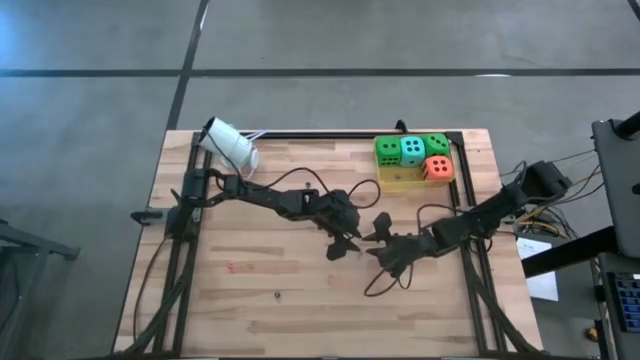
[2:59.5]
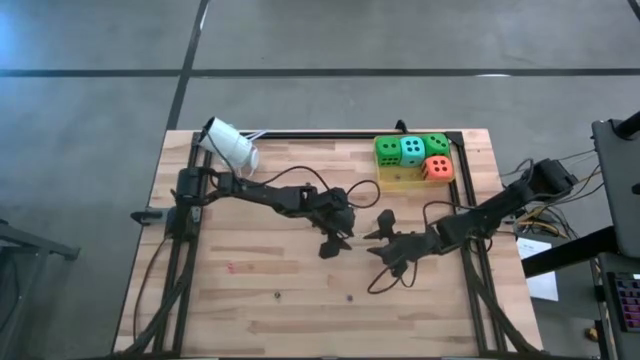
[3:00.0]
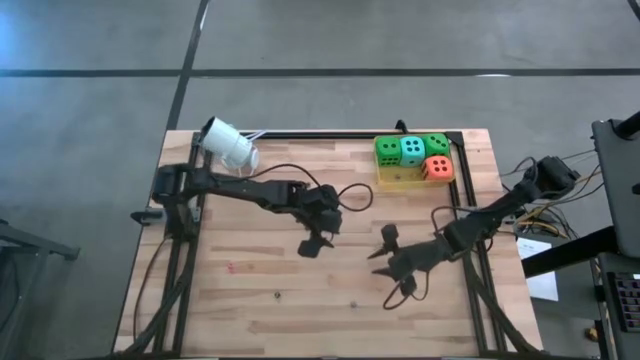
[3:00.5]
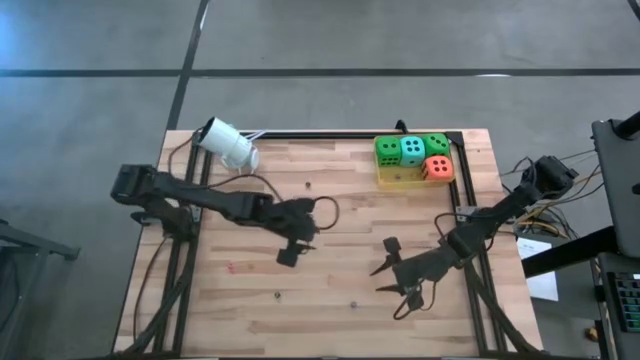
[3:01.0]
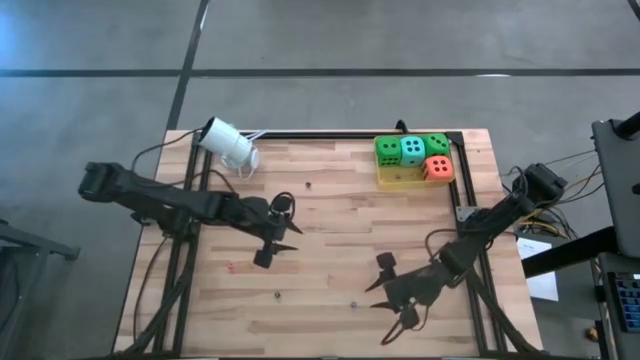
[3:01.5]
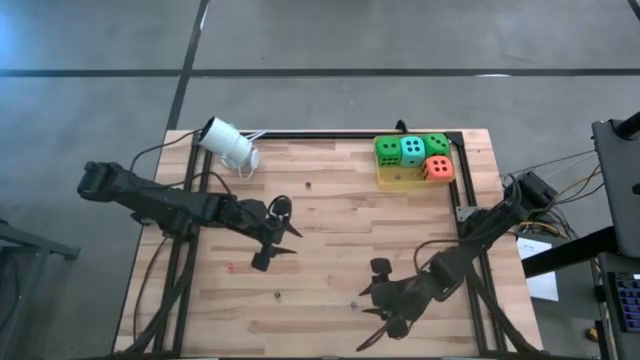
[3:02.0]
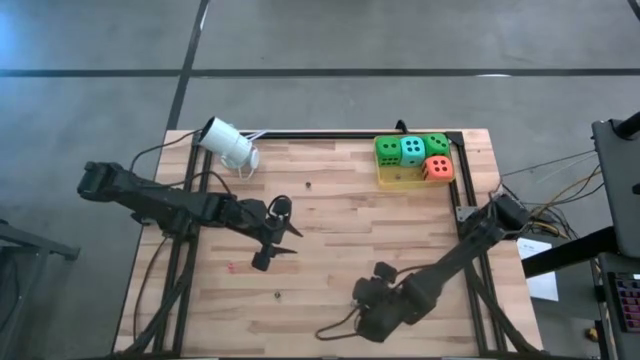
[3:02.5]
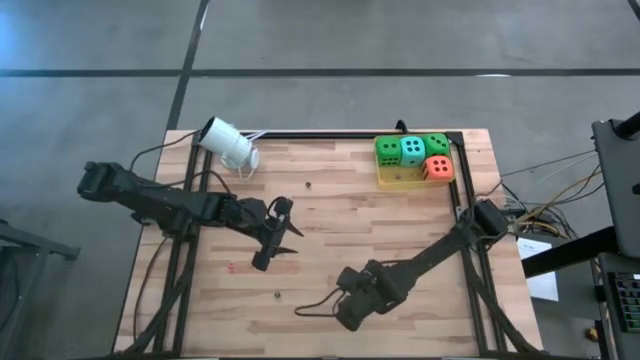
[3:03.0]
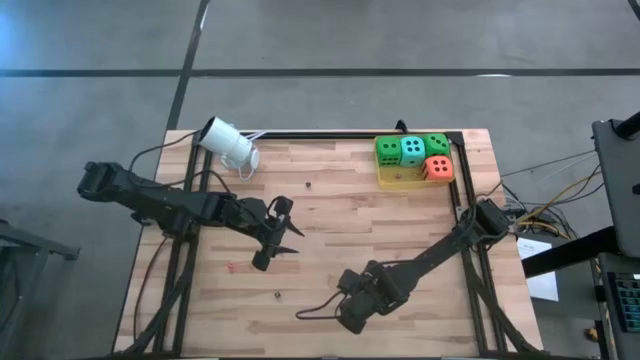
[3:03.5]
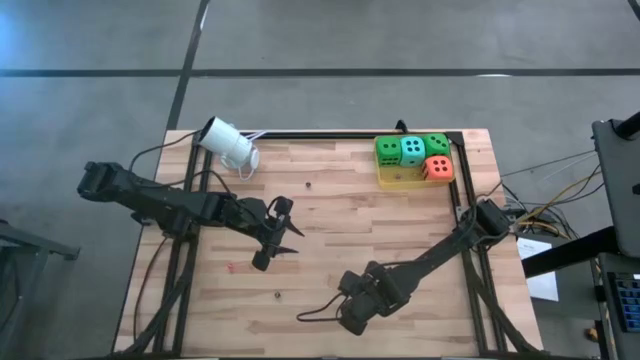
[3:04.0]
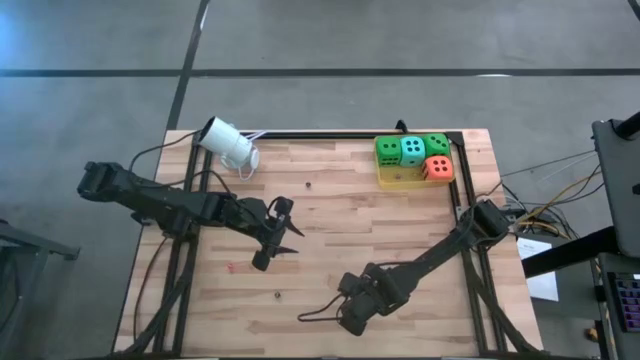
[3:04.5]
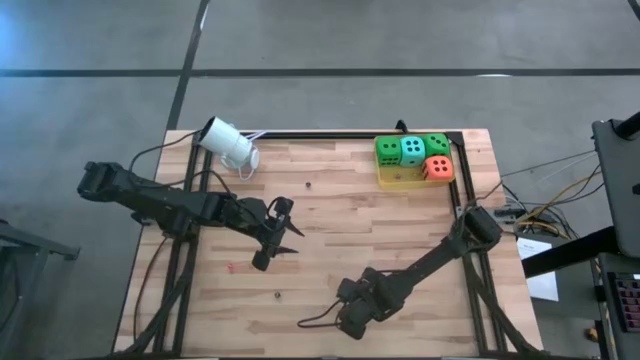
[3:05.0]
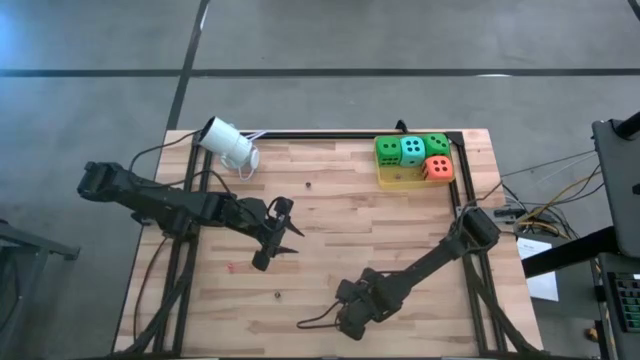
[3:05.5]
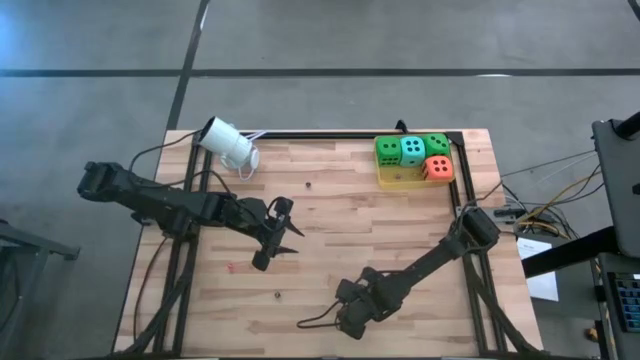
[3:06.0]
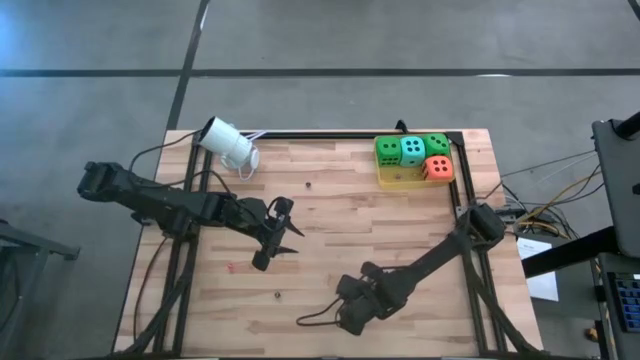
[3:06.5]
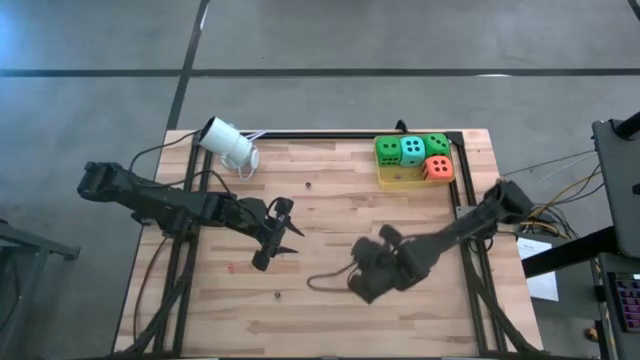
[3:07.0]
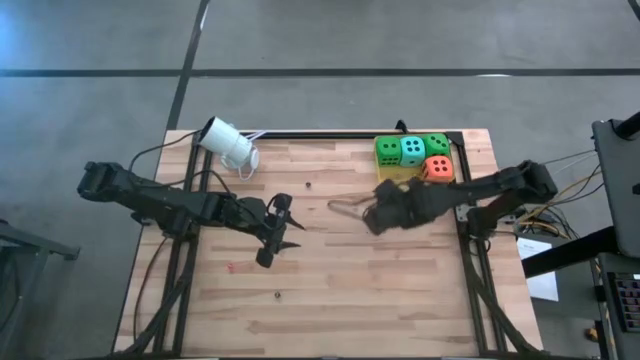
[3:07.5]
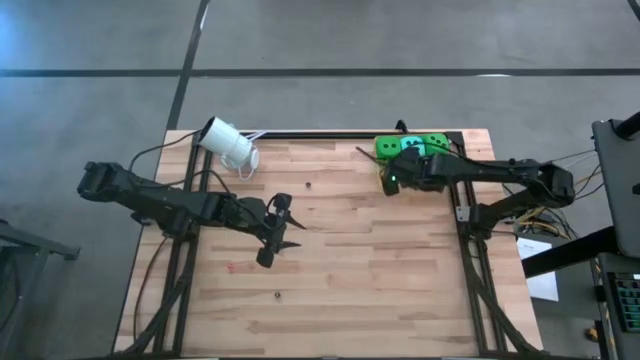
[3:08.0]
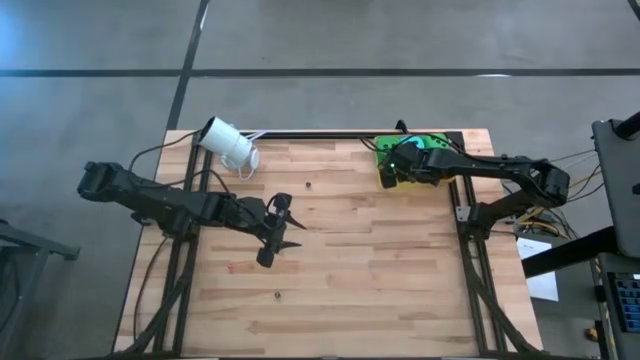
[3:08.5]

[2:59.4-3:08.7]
Task: Pick & Place Dice
Put the small blue dice into the yellow bin

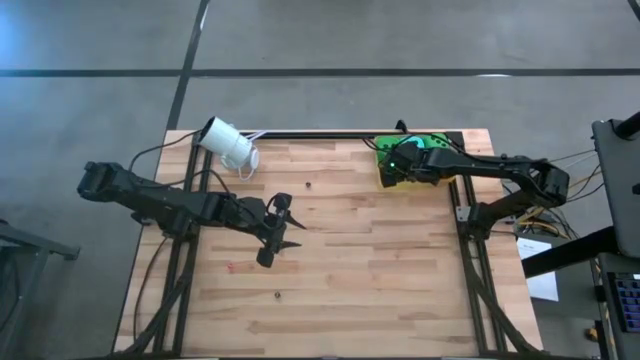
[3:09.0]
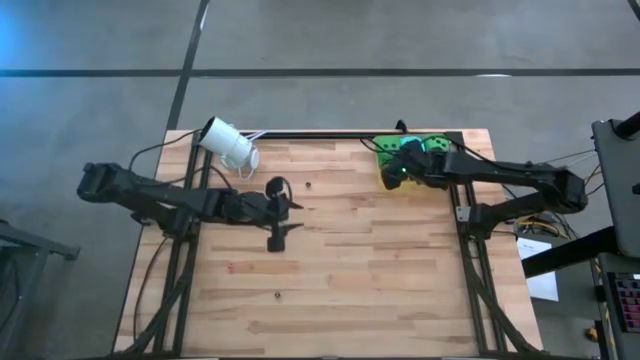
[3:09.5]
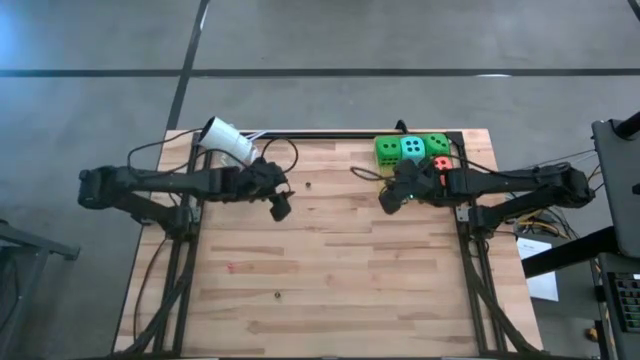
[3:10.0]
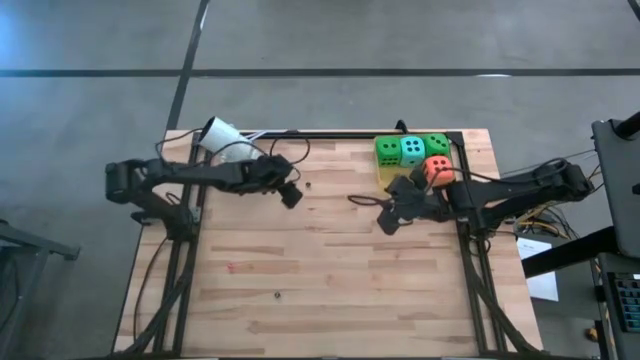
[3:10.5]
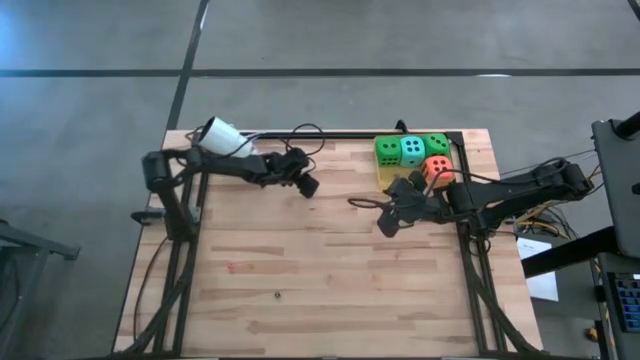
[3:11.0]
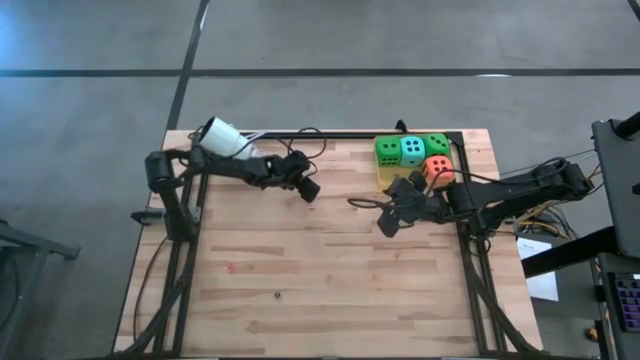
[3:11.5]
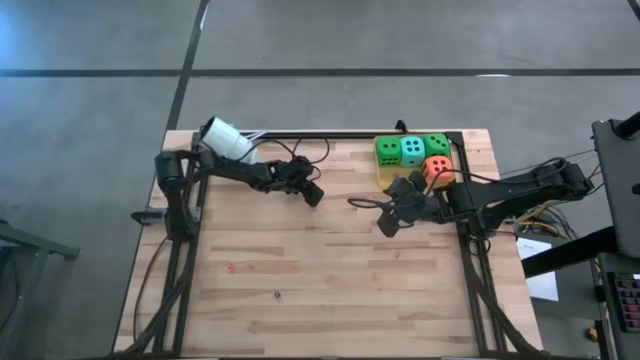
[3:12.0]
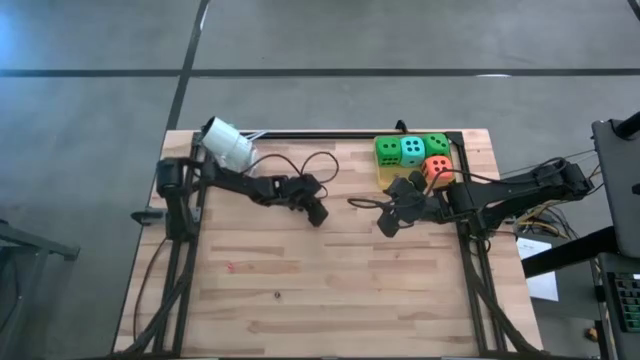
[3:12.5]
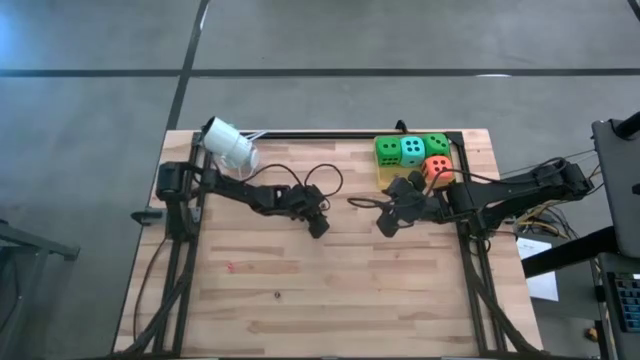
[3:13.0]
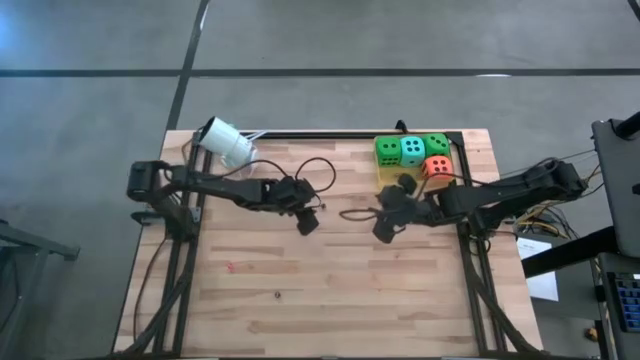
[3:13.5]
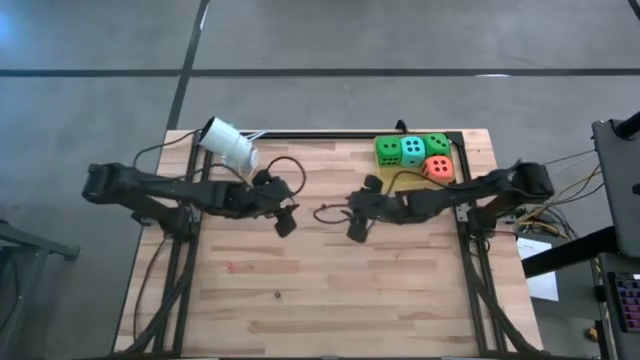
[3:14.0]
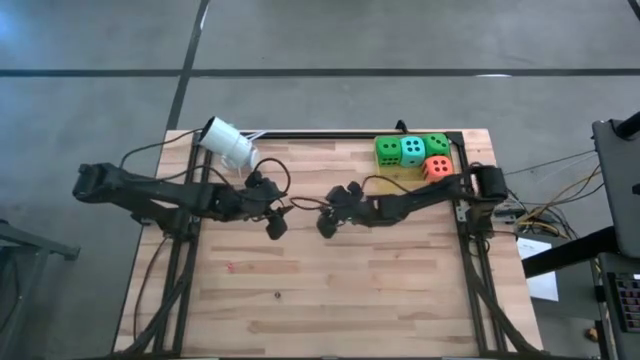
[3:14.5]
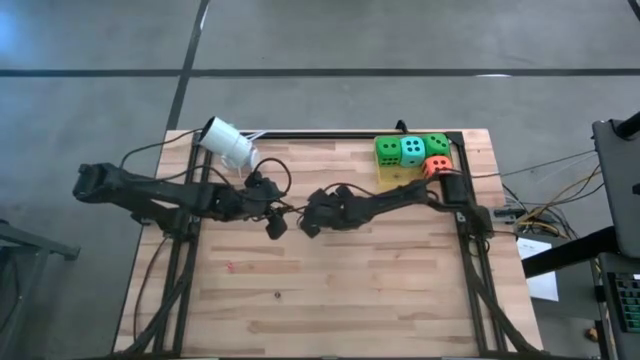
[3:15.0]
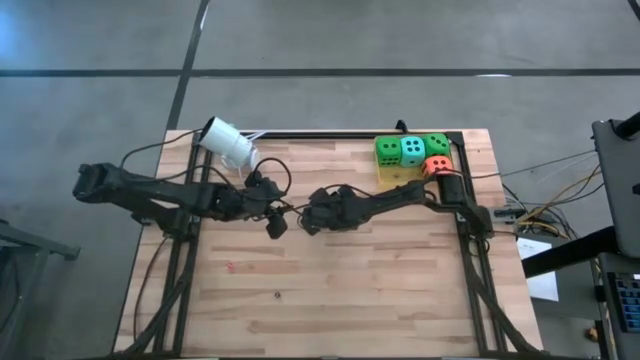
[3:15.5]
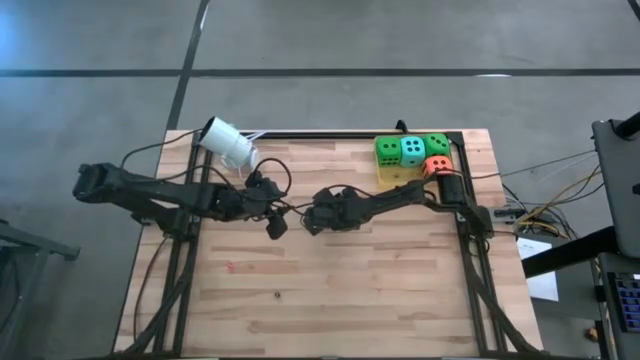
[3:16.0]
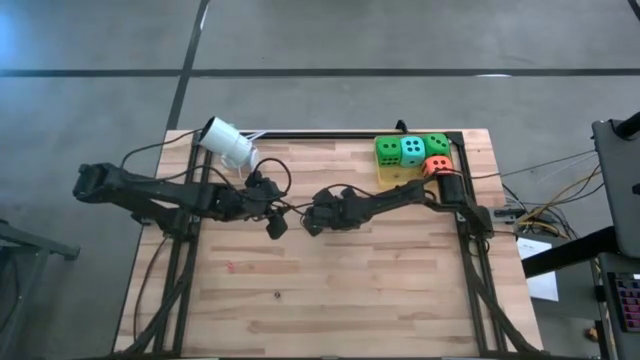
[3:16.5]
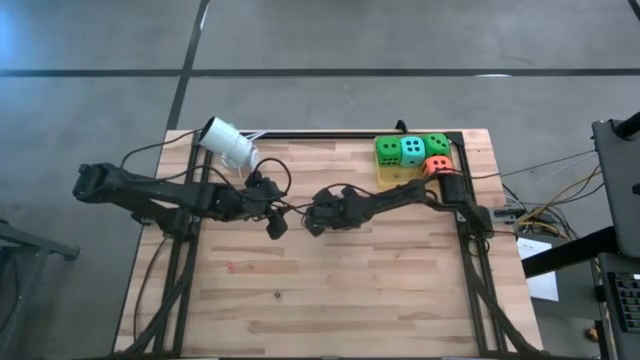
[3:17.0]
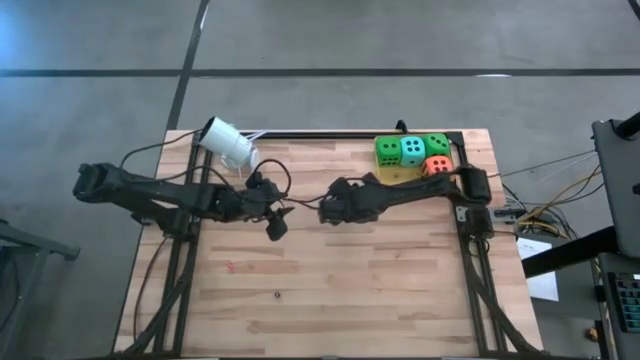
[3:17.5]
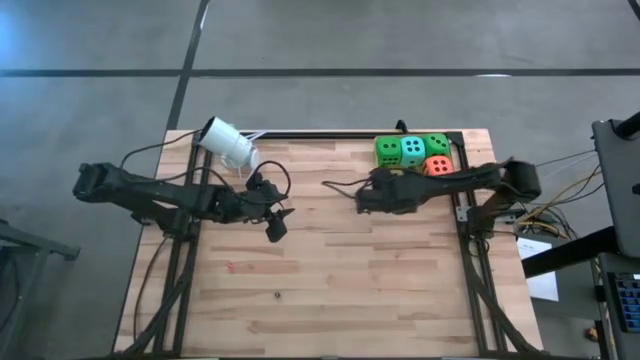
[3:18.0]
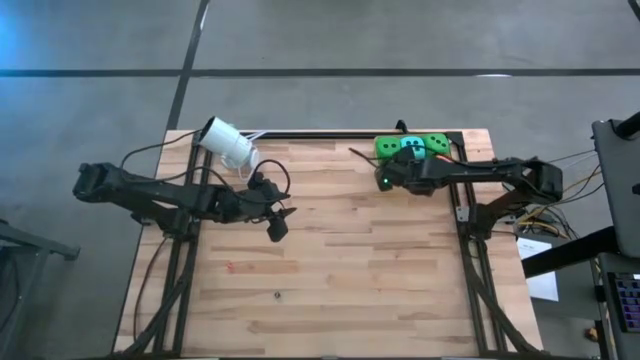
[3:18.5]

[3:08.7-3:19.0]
Put the small black dice into the yellow bin

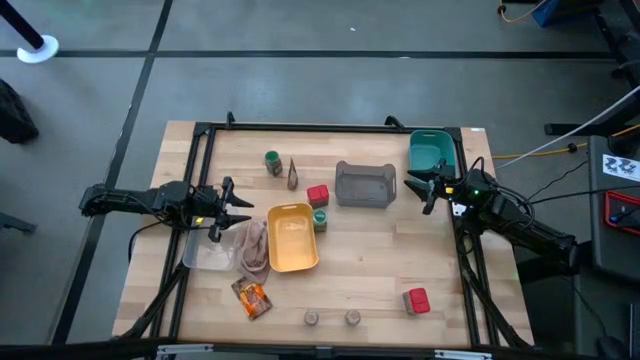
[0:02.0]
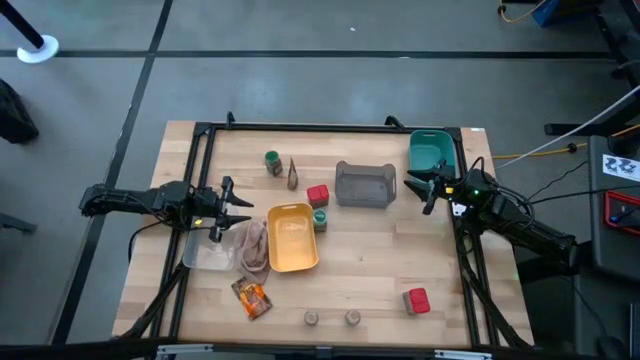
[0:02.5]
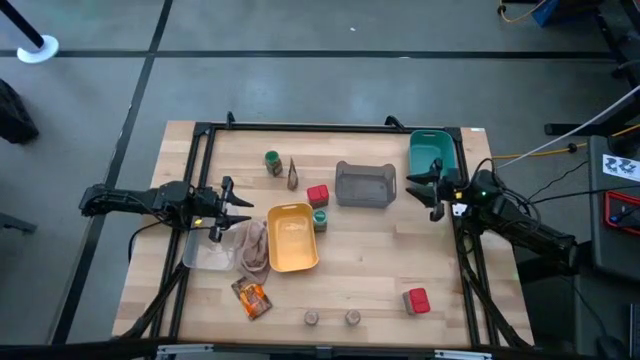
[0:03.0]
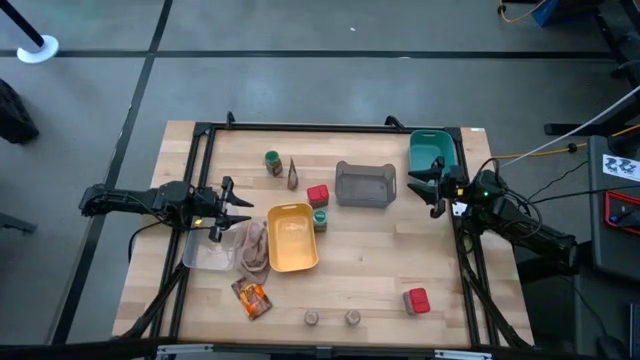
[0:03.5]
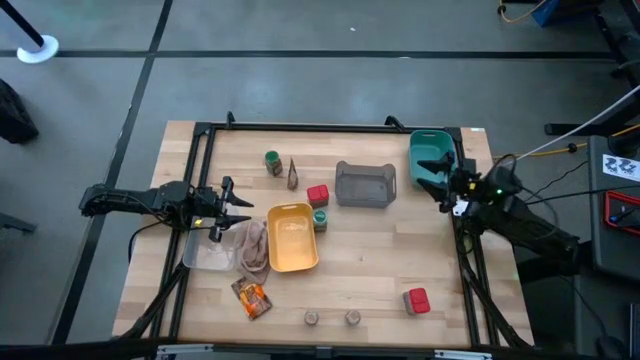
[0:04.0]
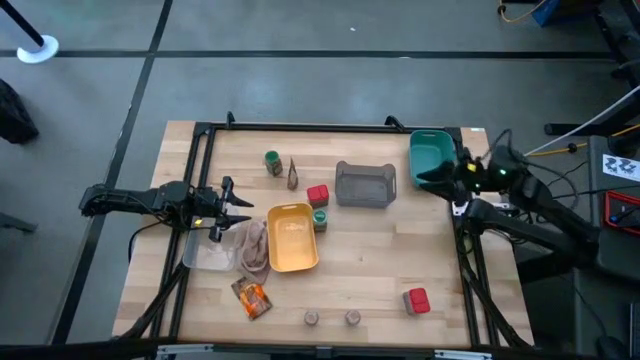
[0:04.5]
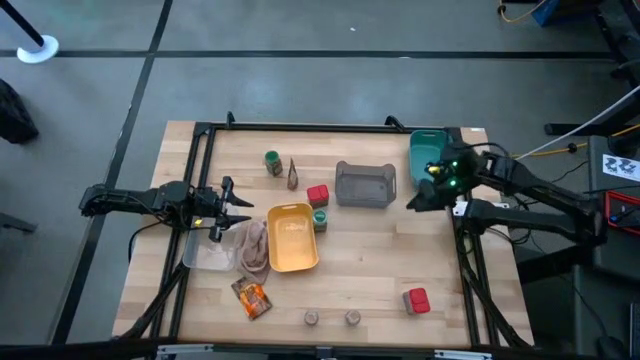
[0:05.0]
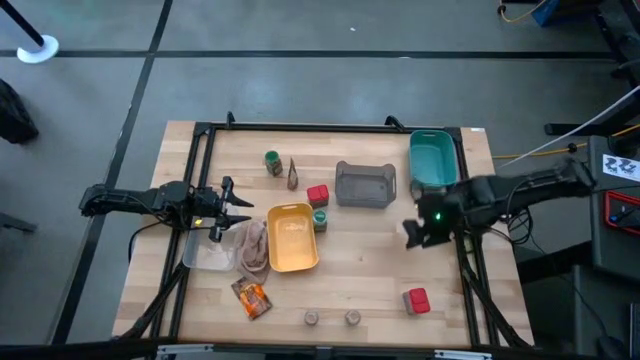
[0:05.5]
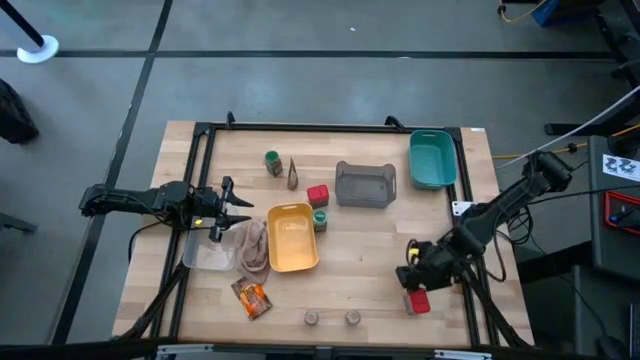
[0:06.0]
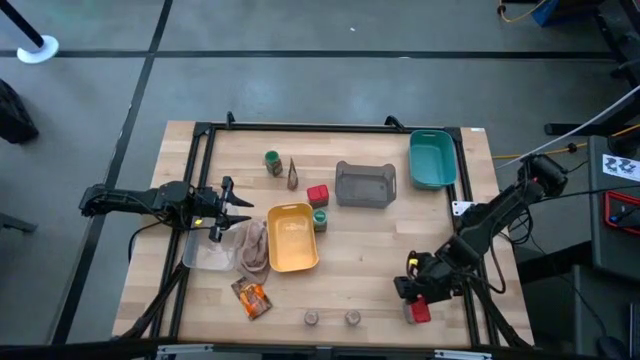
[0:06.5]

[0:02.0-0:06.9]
Task: Sort spices by type
Put the bottom red seasoning can into the green bin
